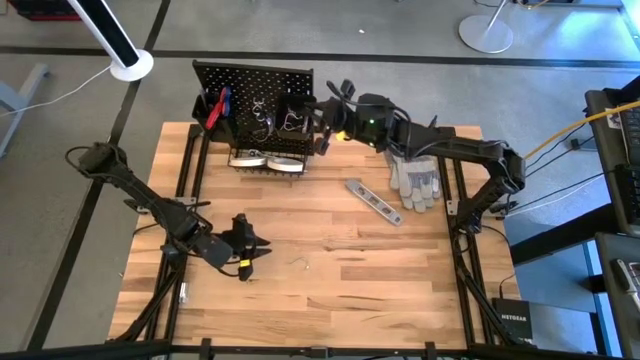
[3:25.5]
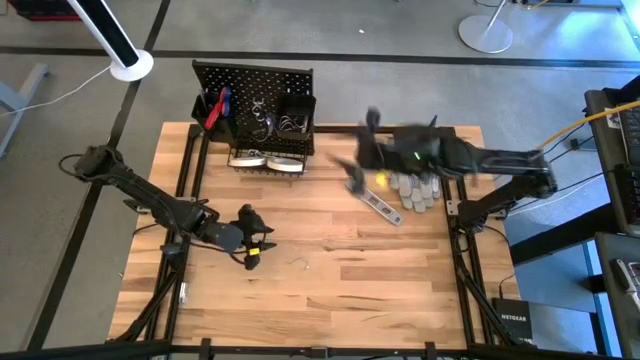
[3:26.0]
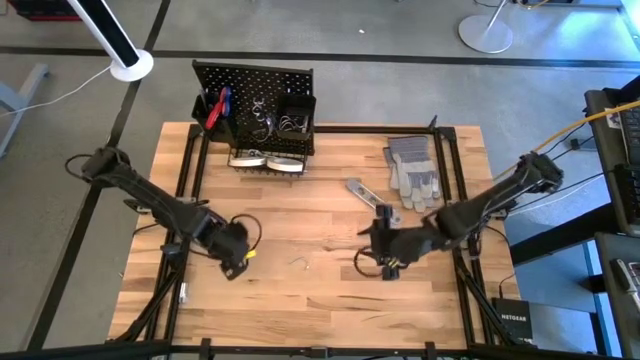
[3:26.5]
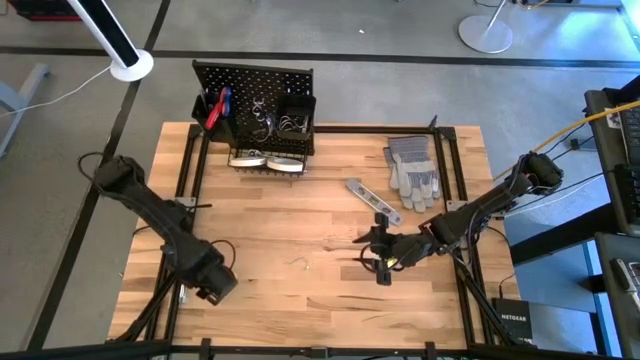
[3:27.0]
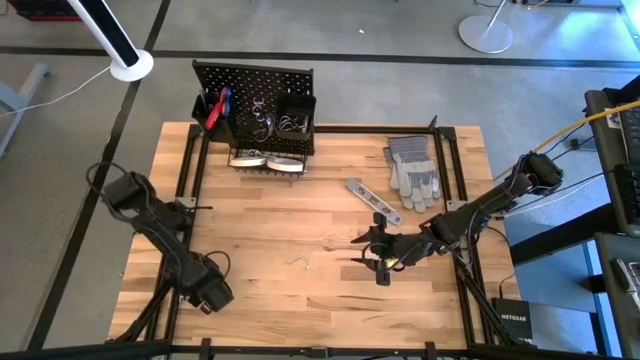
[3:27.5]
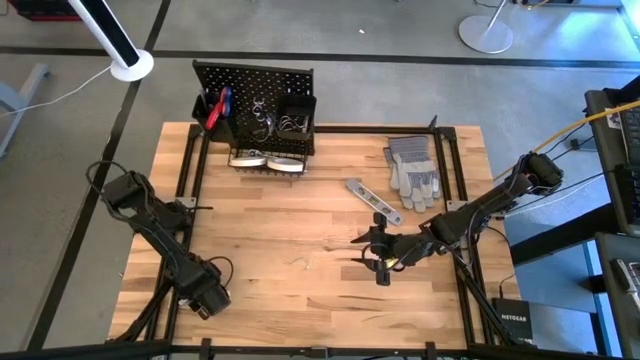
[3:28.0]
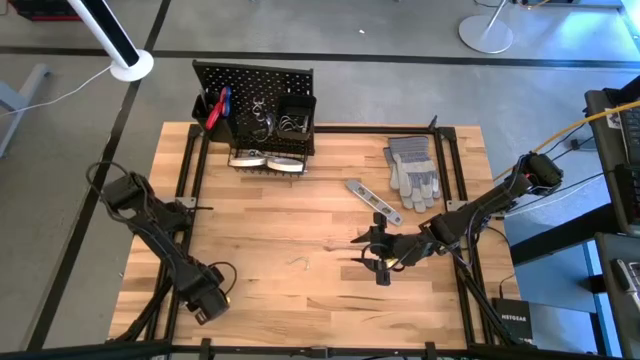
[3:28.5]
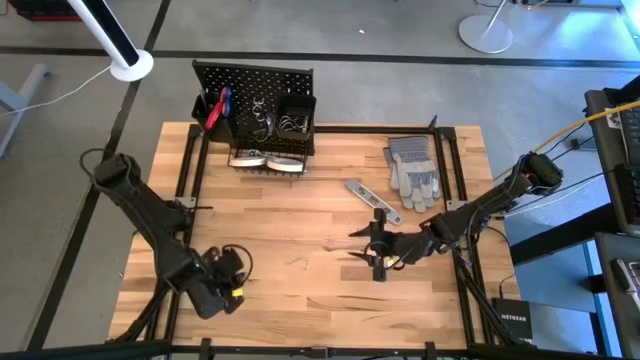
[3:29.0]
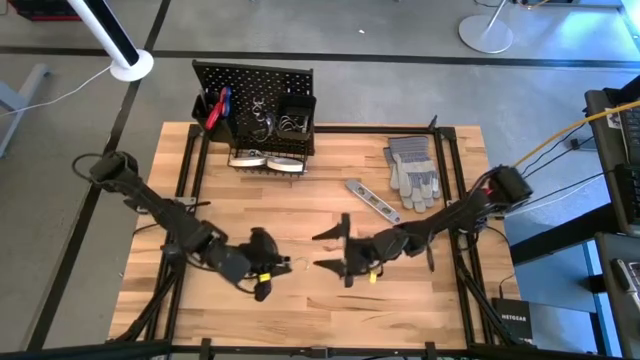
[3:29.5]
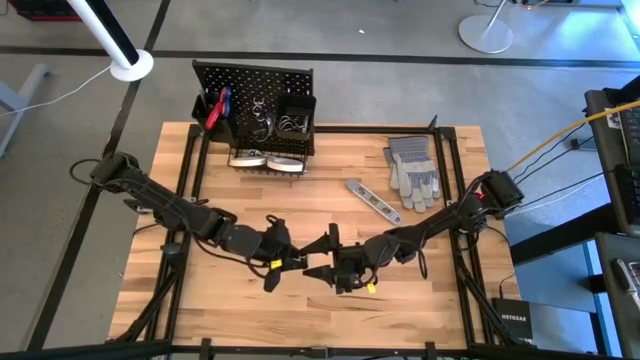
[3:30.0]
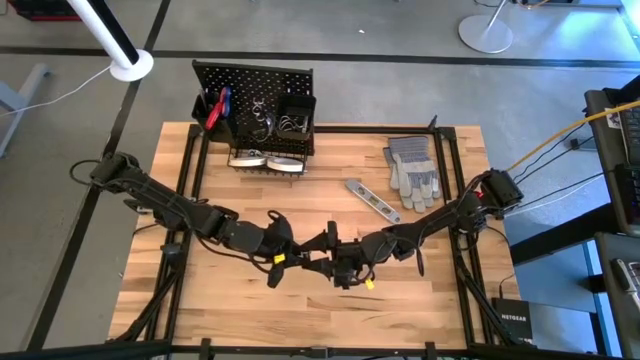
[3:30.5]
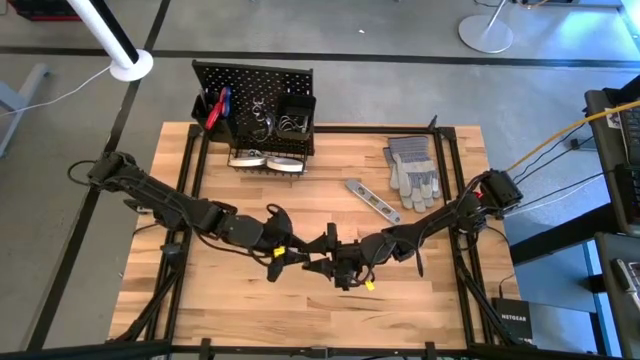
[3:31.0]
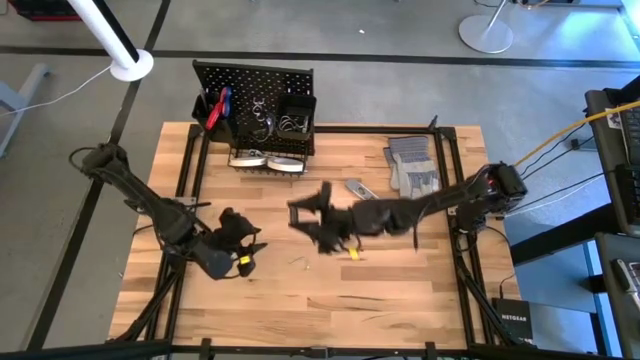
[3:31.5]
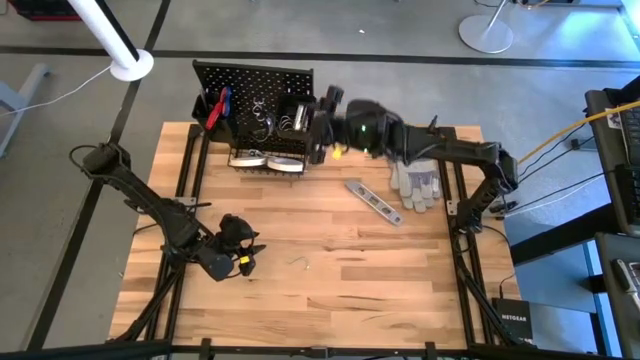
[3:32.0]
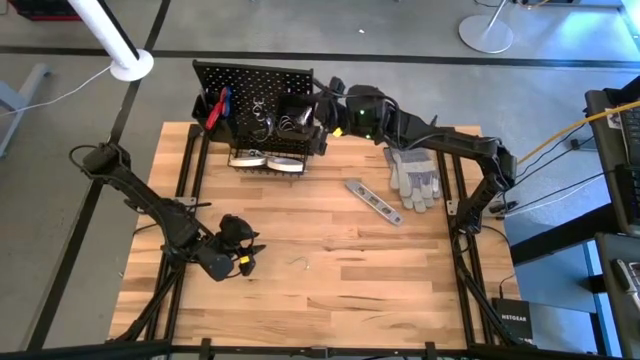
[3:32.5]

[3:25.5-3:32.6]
Task: Hang tools onto peg board
Put the silver socket into the right black bin on the pegboard

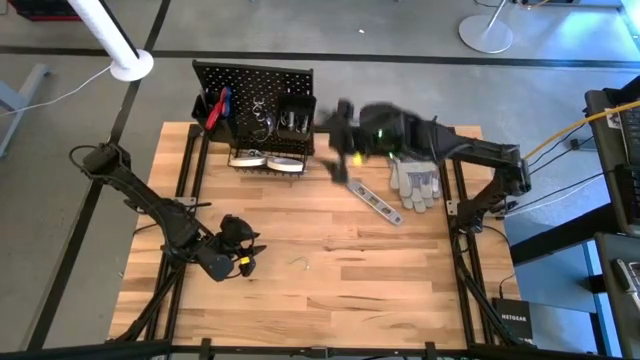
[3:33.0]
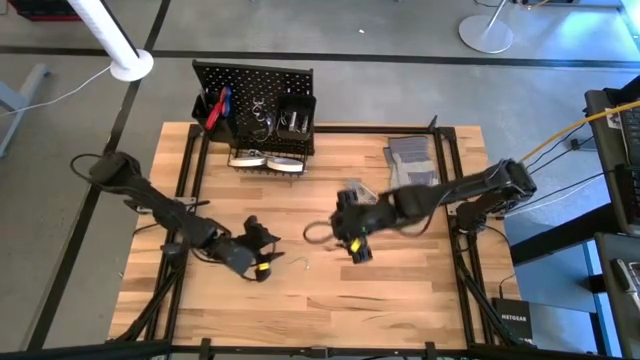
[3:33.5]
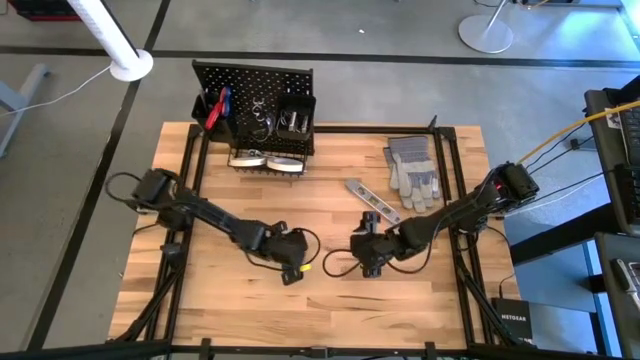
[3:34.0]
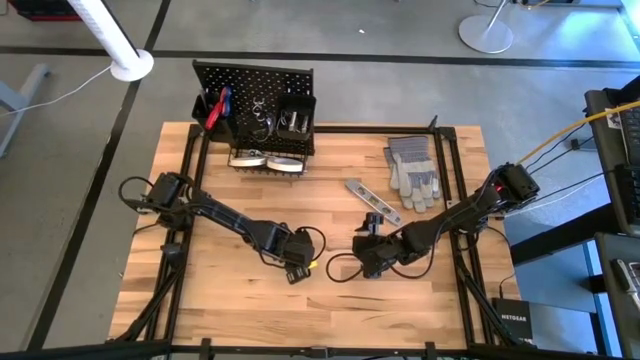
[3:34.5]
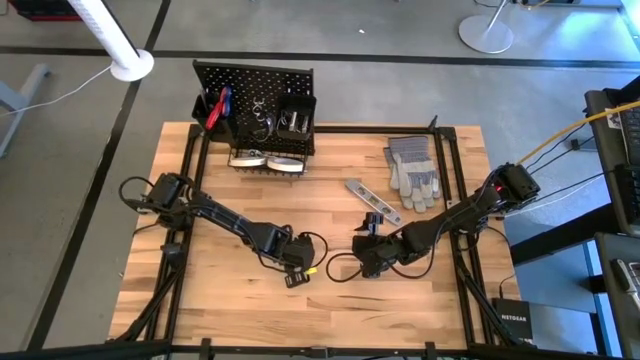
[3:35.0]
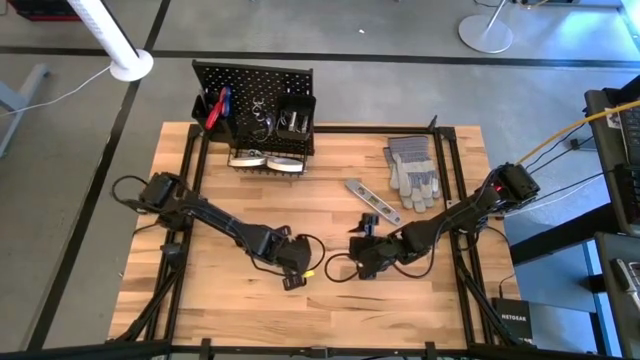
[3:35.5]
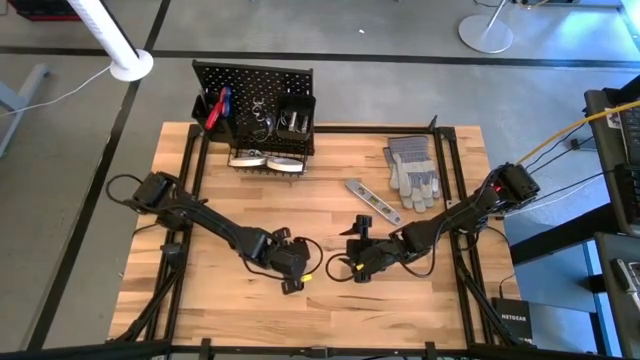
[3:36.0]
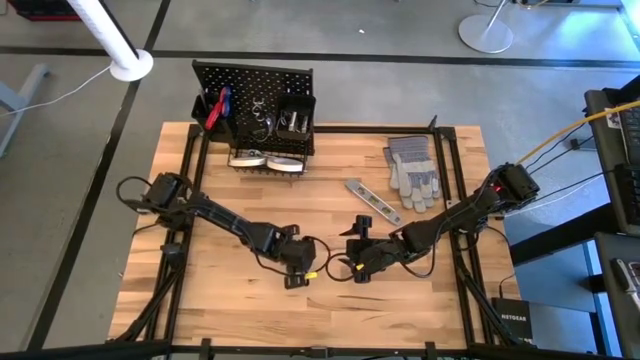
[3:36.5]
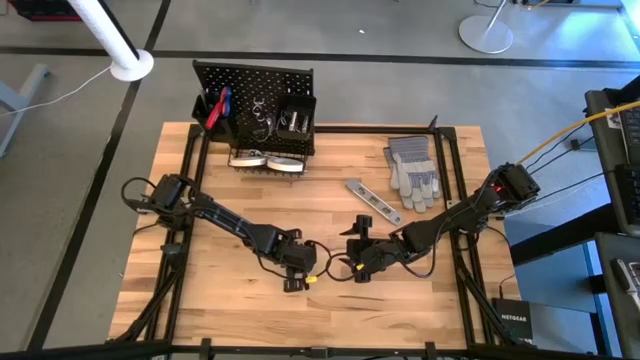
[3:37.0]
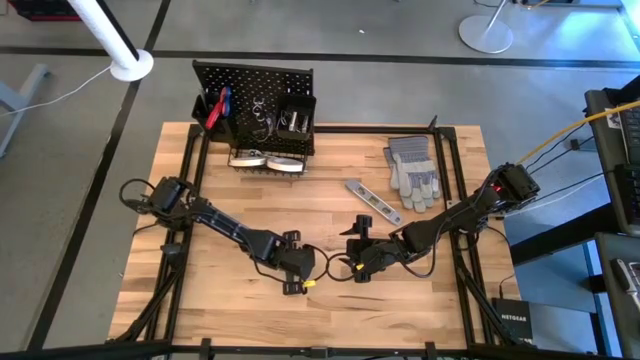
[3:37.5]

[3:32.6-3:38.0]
Put the silver hanger hook into the right black bin on the pegboard

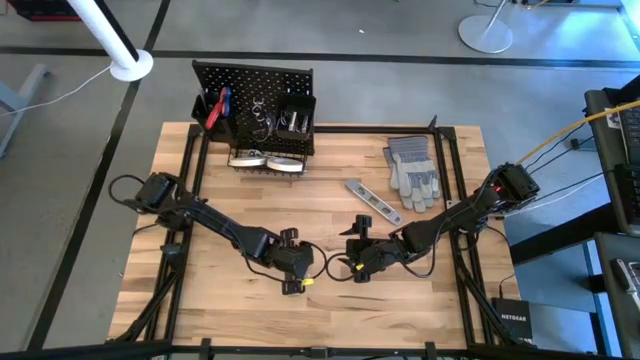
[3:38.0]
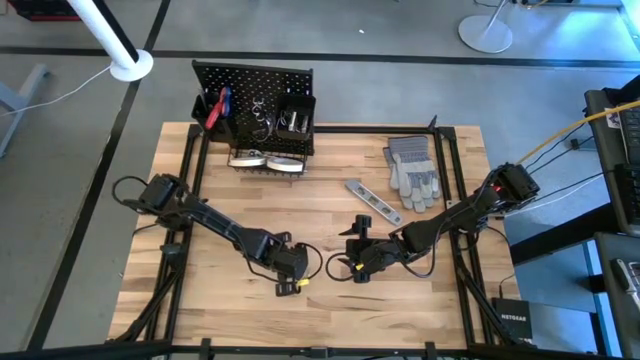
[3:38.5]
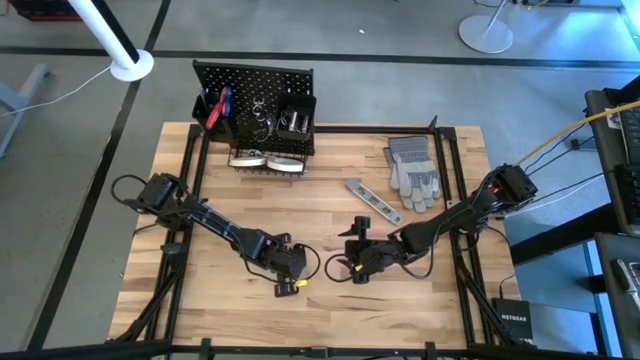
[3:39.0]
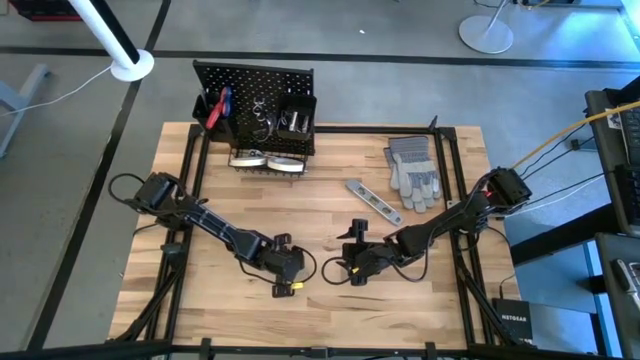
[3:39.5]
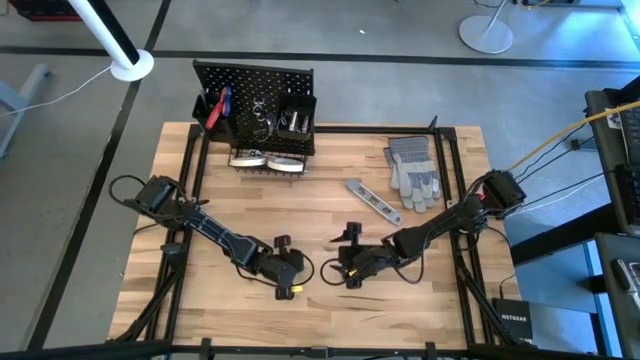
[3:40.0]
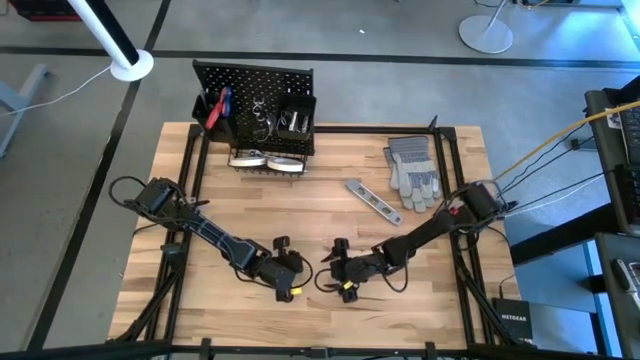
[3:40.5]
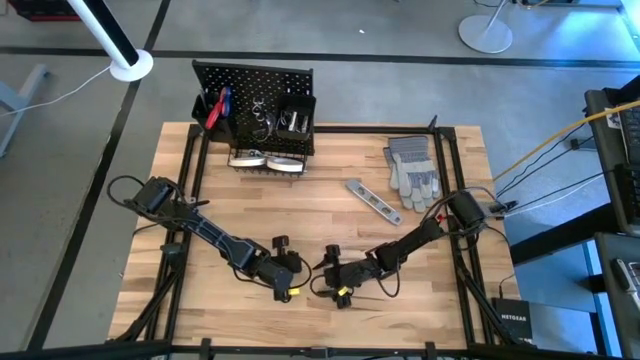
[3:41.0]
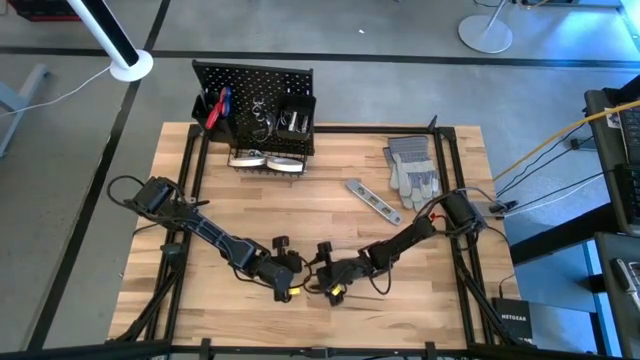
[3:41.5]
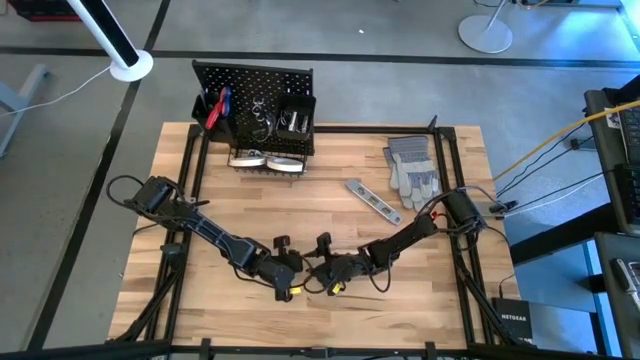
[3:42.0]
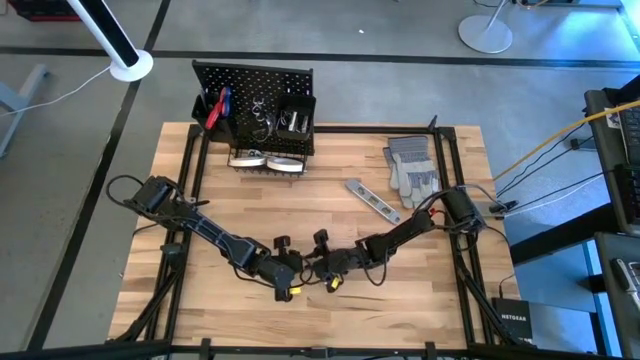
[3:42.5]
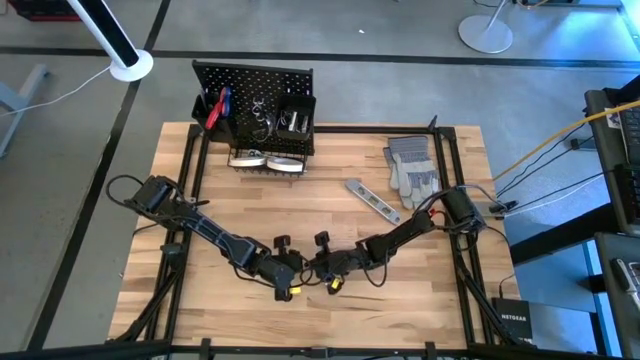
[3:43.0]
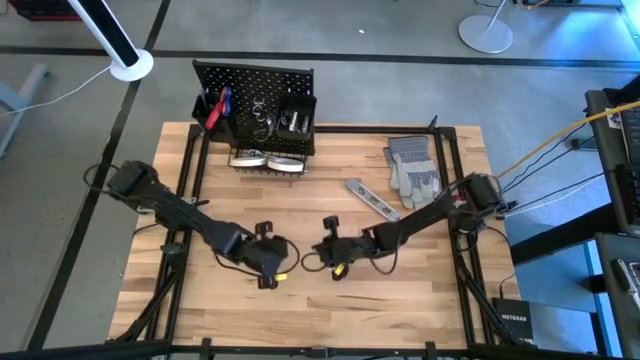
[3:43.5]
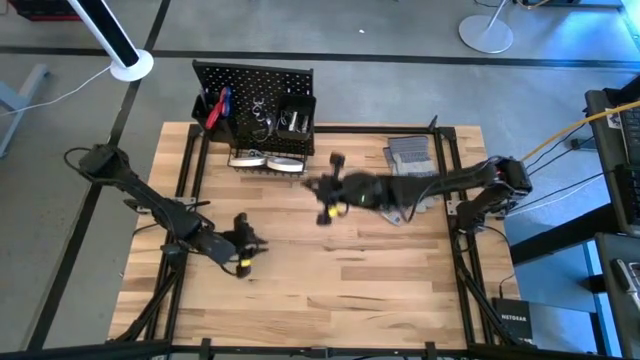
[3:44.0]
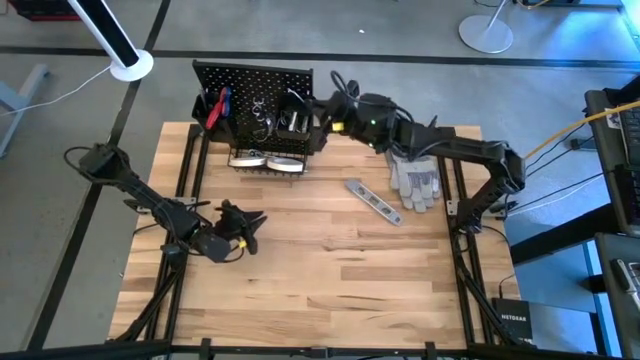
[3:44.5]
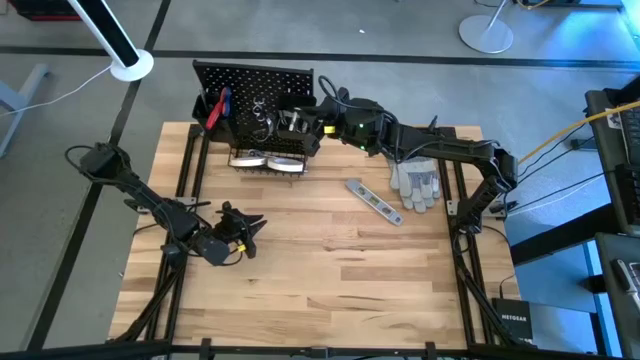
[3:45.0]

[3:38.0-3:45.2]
Put the silver hanger hook into the right black bin on the pegboard
